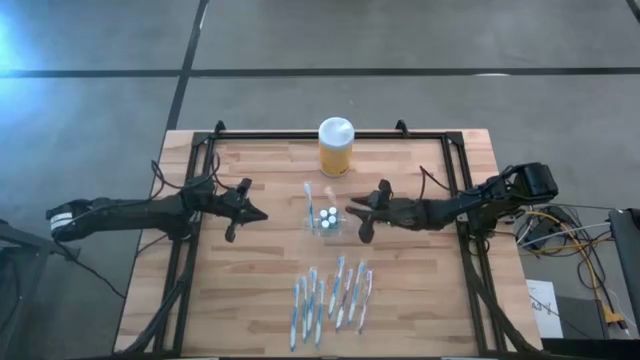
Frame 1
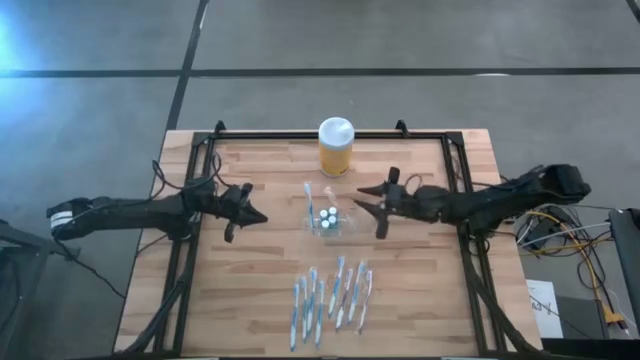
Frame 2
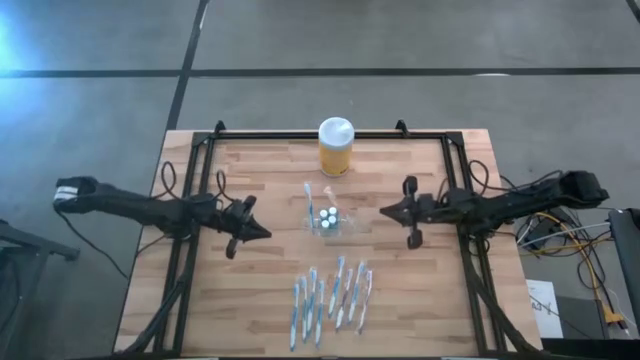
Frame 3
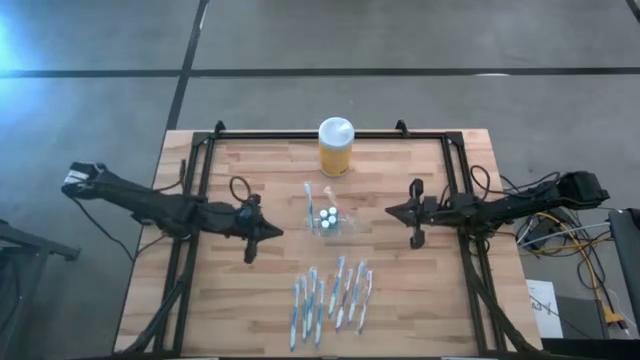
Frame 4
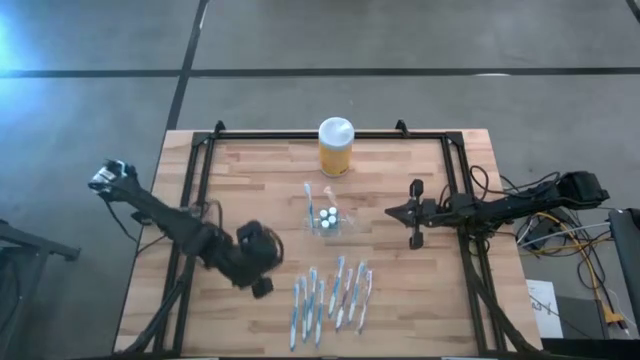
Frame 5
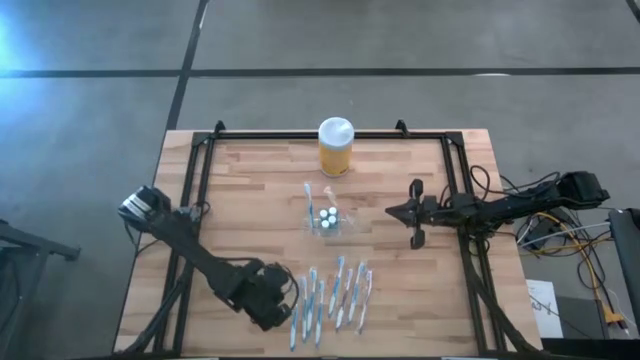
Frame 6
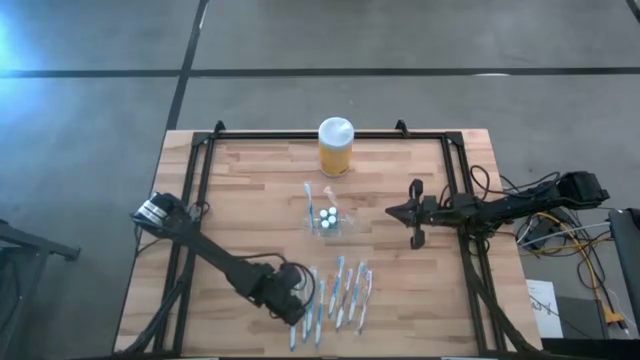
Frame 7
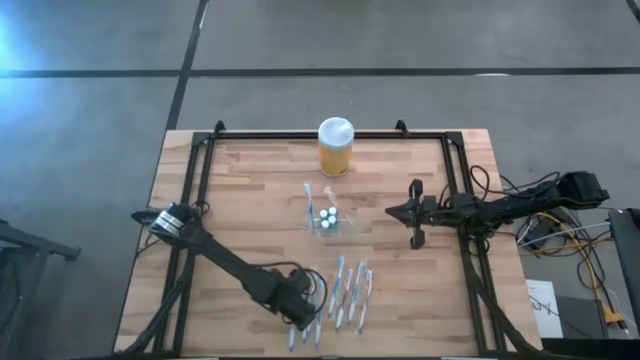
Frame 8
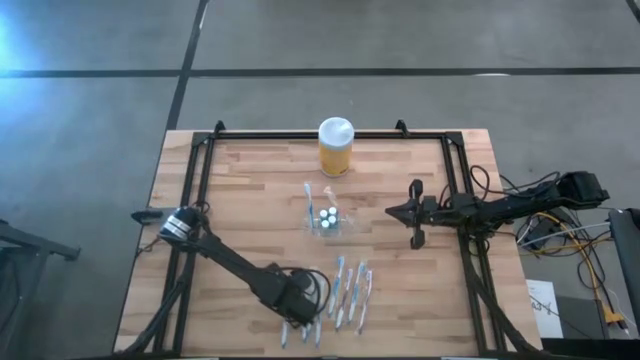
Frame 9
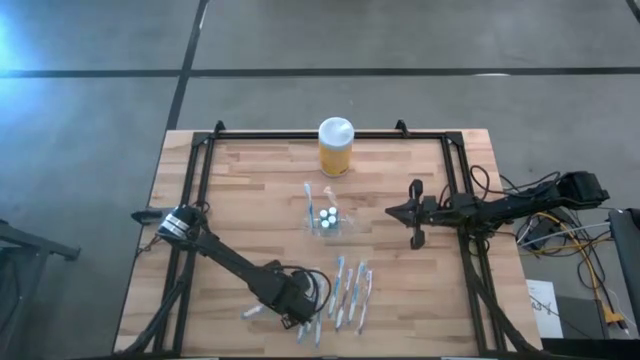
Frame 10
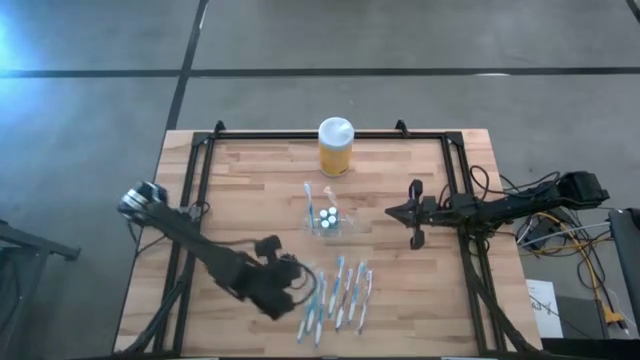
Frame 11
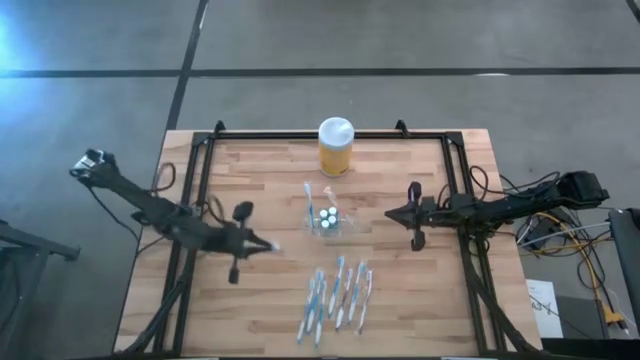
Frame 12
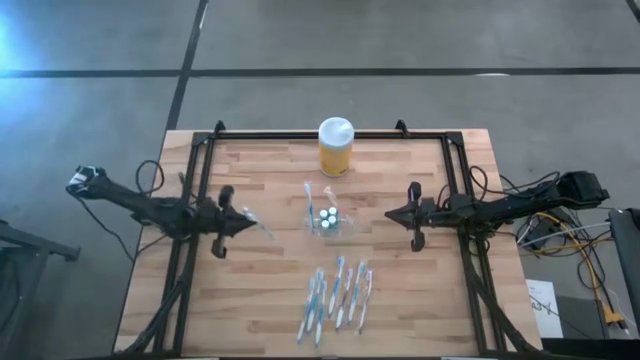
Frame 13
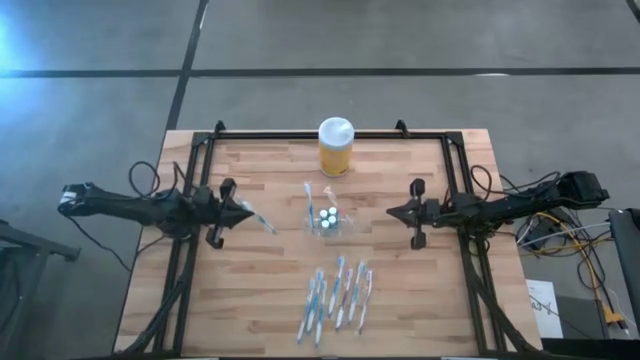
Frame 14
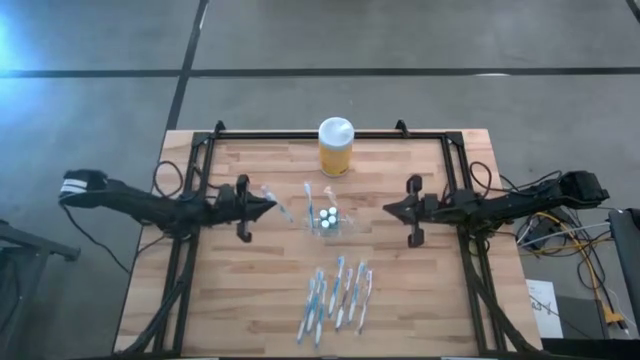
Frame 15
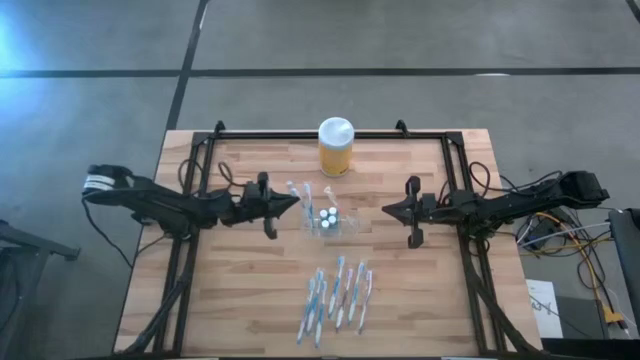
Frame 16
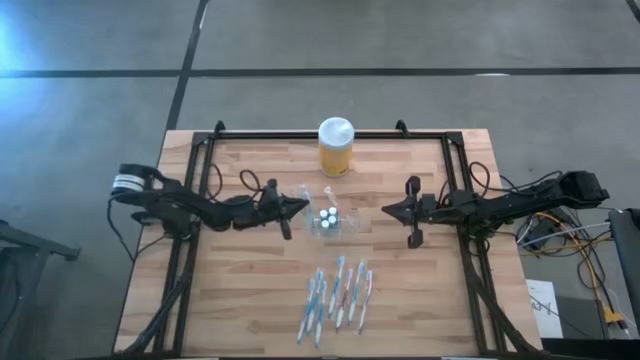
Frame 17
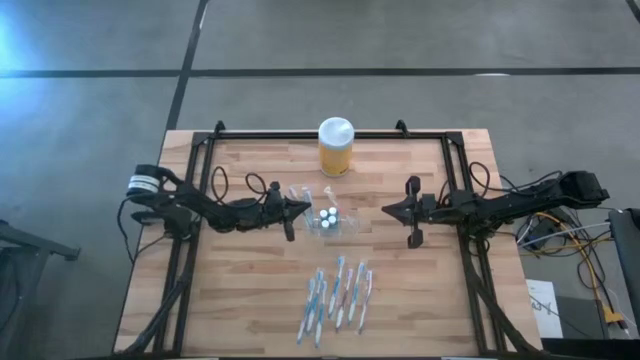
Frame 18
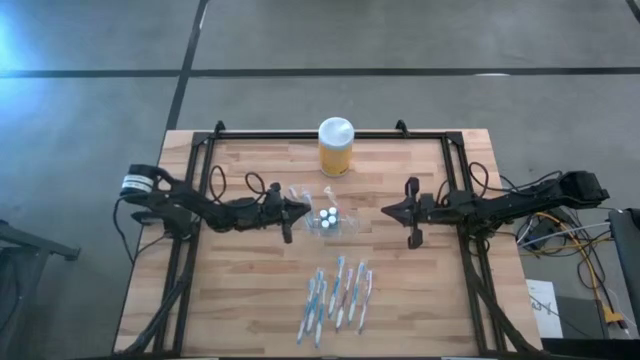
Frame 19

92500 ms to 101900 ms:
Task: Pick & Place toothbrushing station
Put the blue toothbrush into the transparent organizer

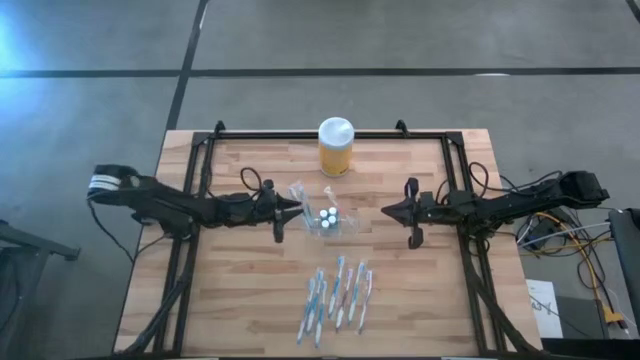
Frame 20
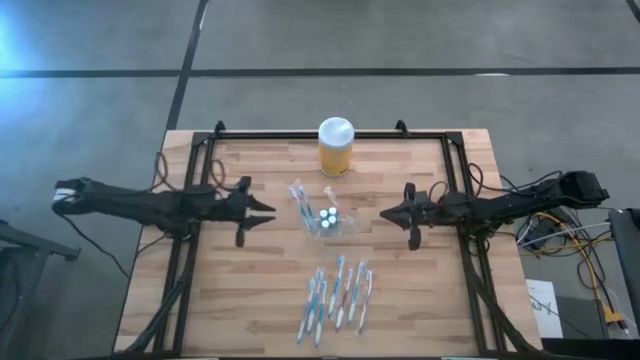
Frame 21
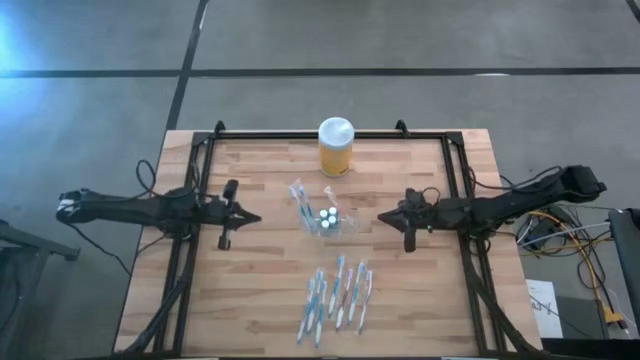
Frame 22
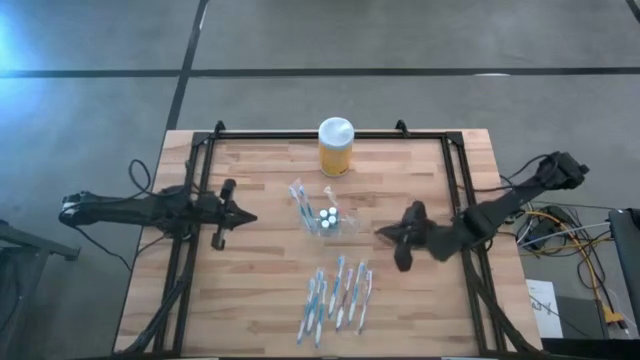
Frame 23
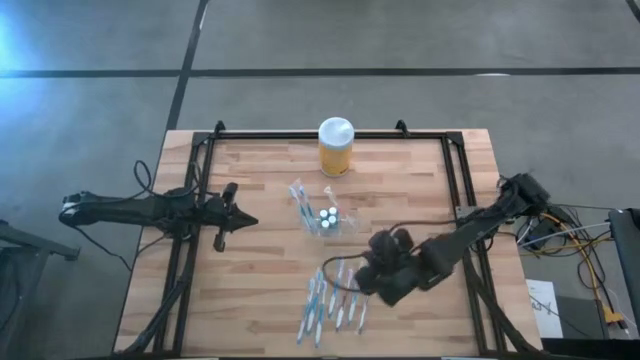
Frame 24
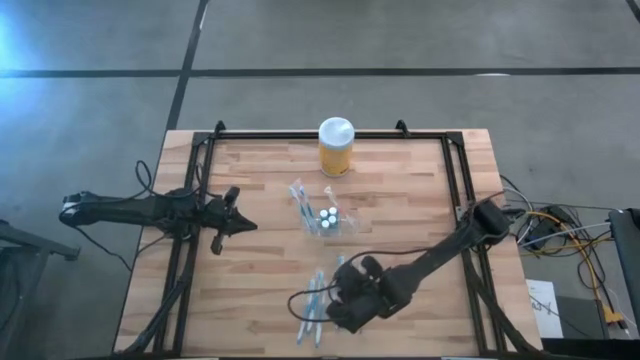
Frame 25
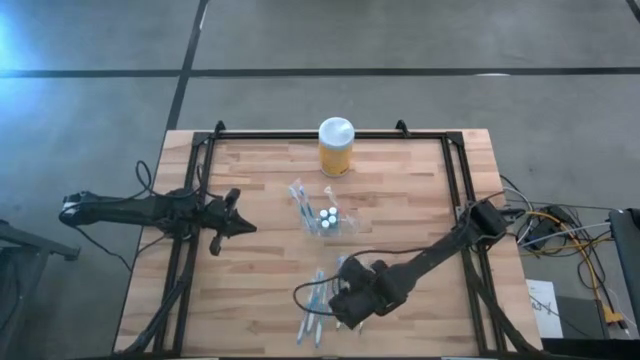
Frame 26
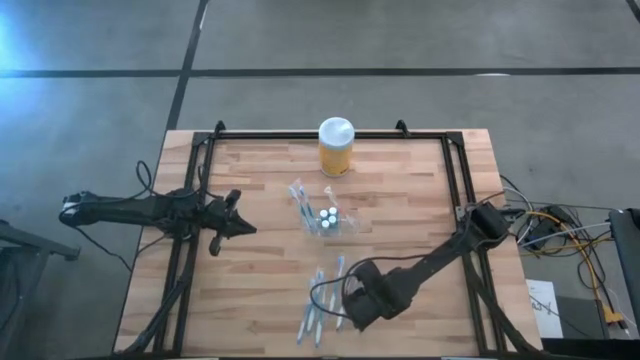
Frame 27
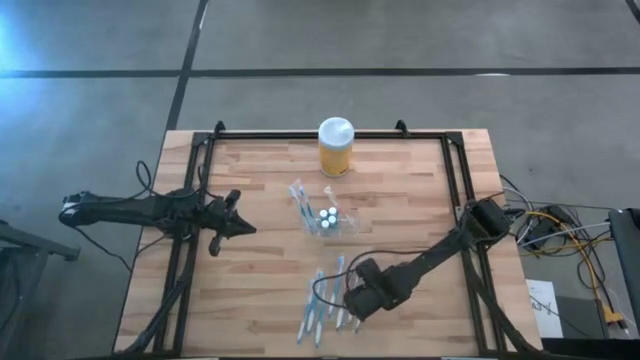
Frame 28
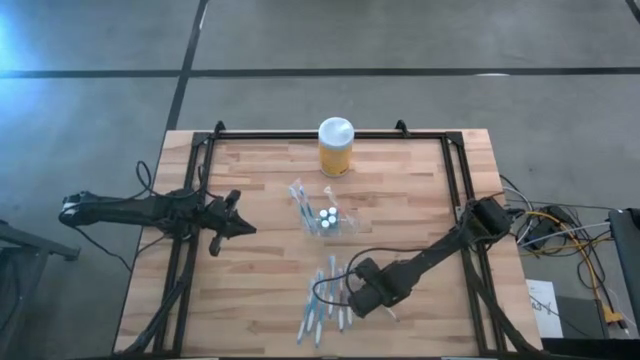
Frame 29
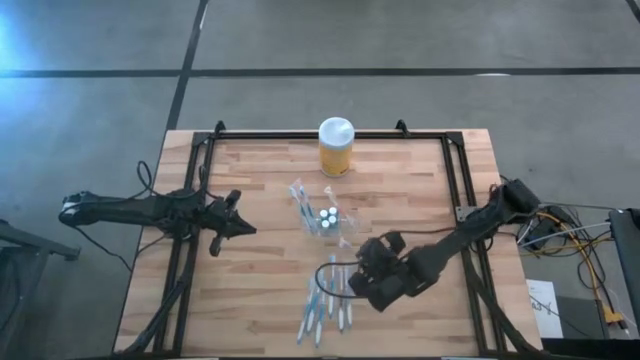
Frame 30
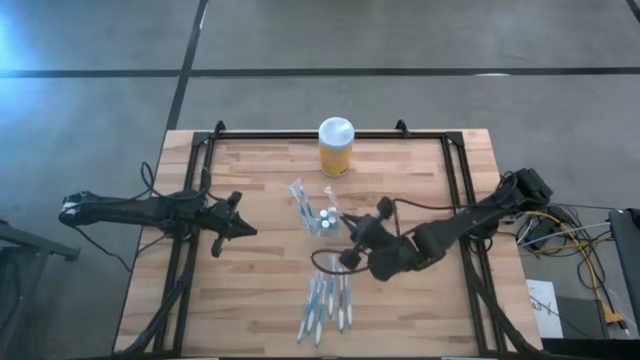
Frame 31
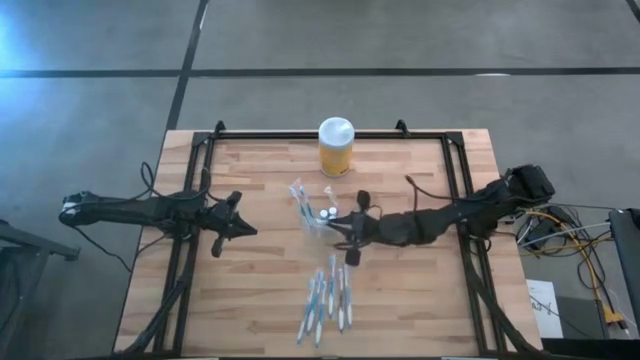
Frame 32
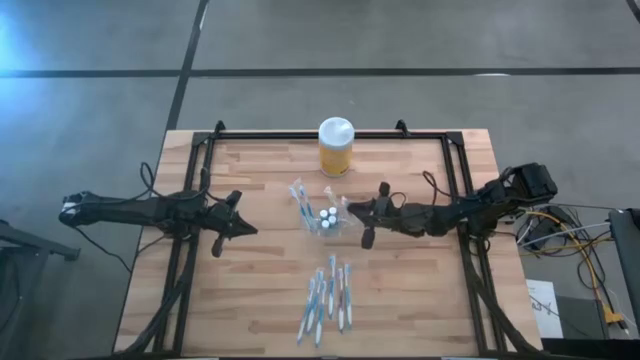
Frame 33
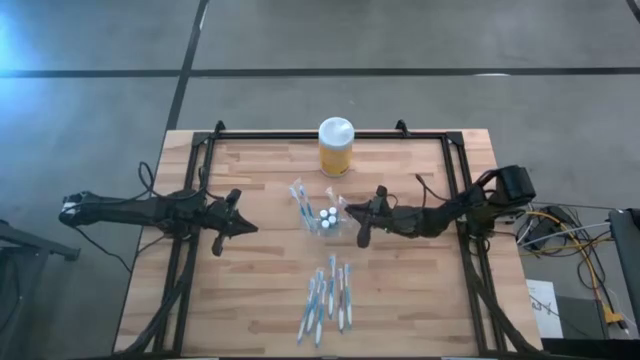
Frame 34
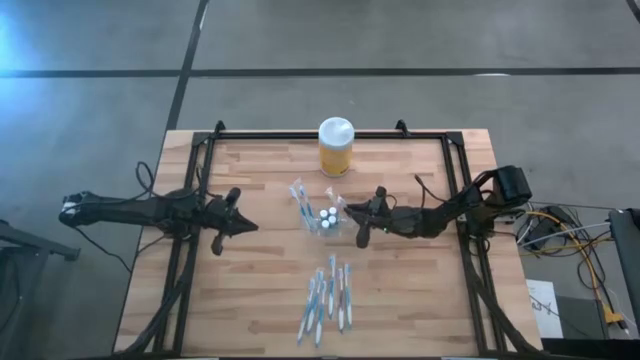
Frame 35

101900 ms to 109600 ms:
Put the violet toothbrush into the transparent organizer

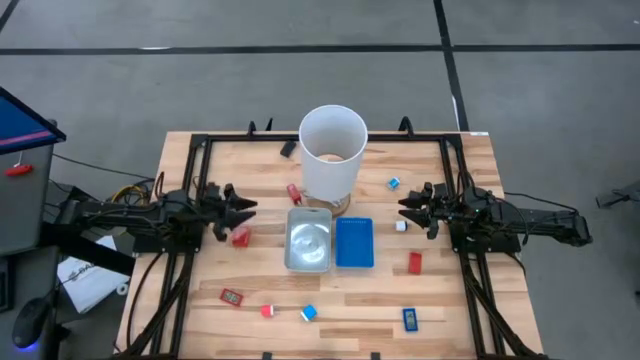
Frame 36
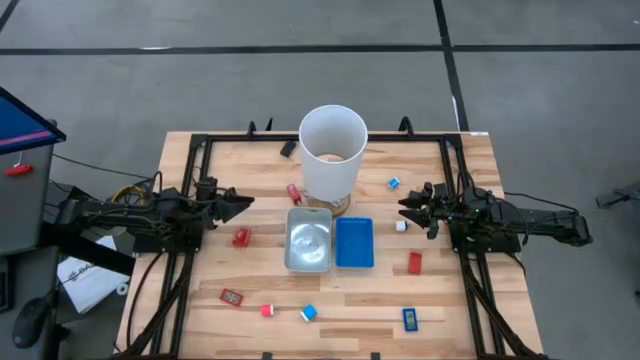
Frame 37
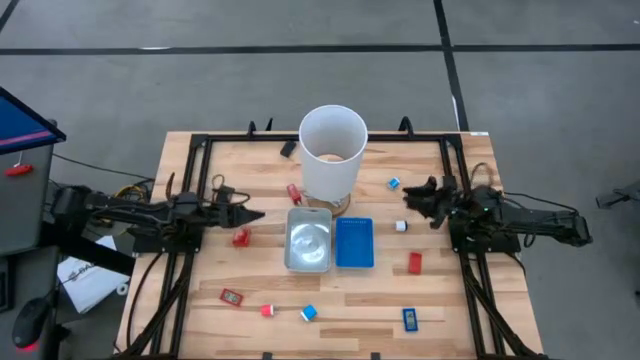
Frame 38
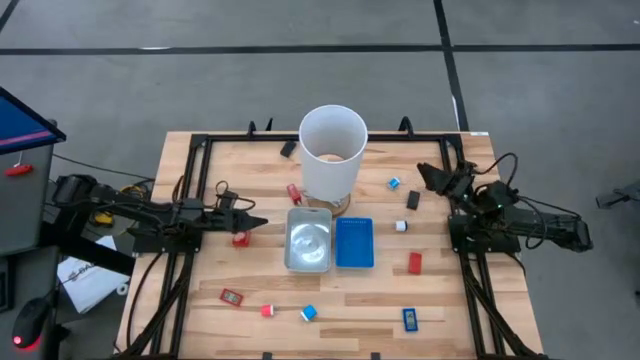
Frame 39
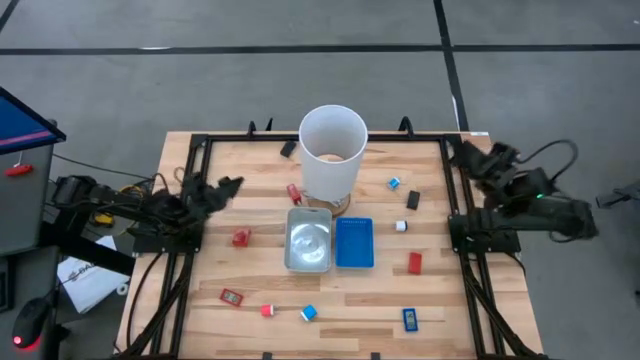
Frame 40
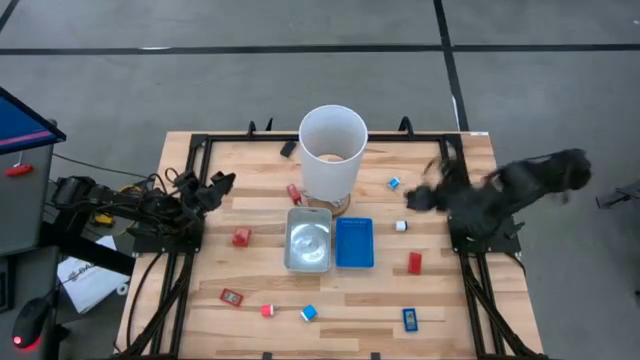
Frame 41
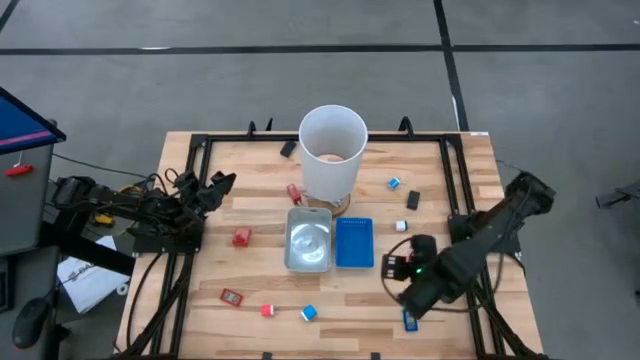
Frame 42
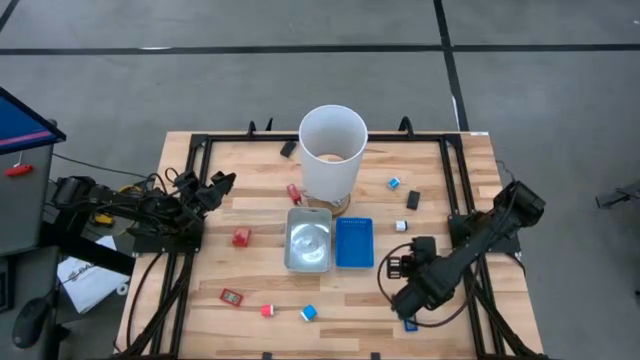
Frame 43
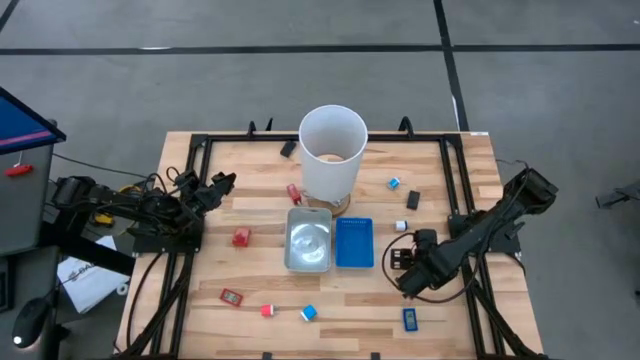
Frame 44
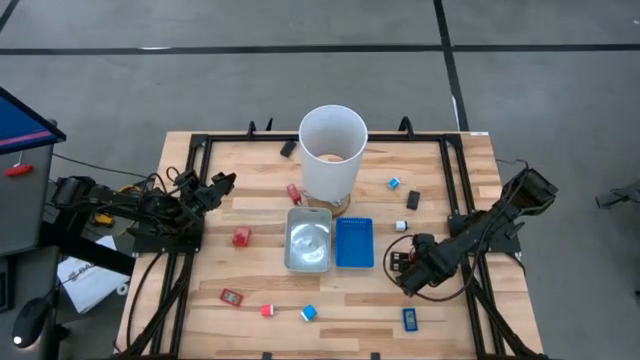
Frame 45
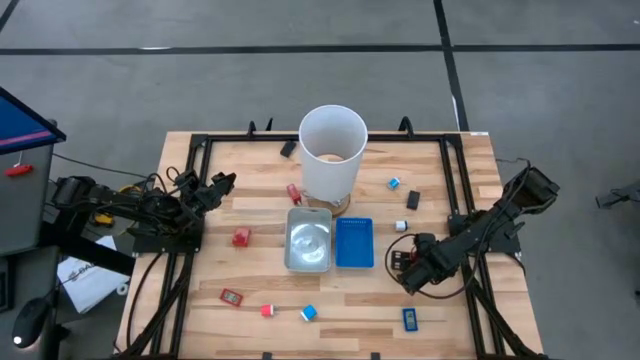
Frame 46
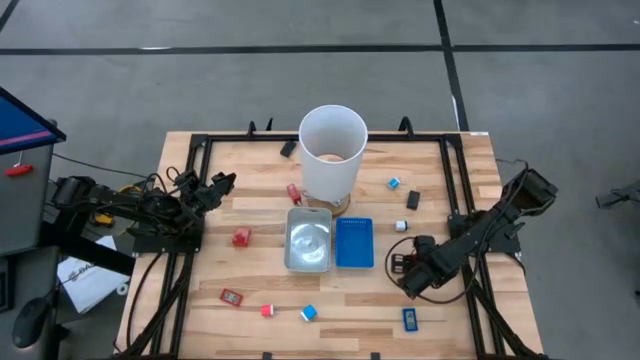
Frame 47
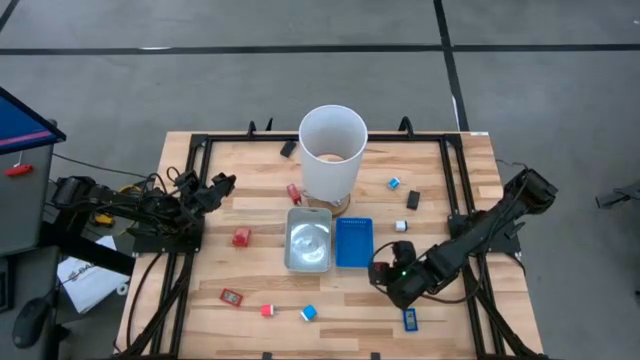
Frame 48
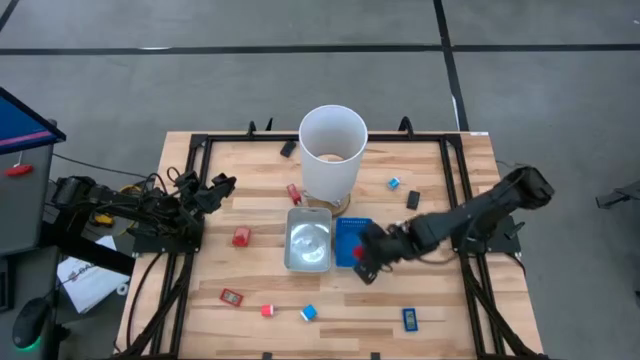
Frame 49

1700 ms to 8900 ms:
Task: Pick & Place Office items
Put the top red digital clock into the blue bin
